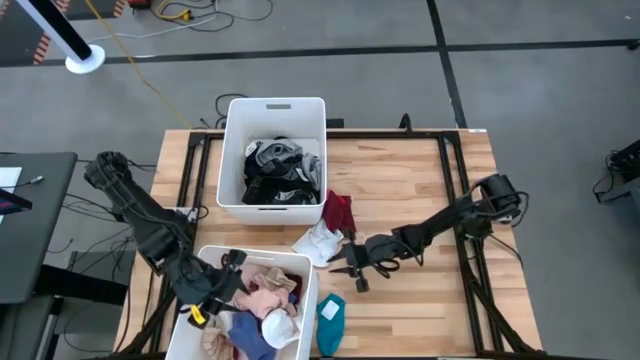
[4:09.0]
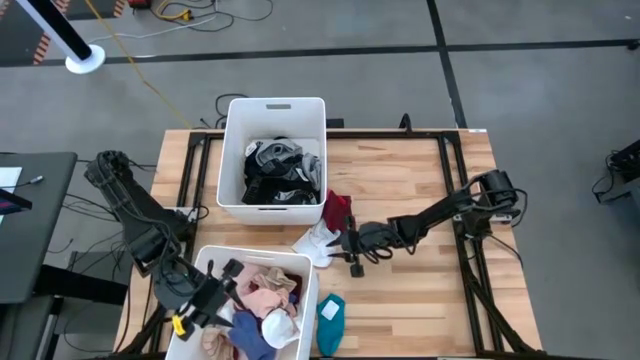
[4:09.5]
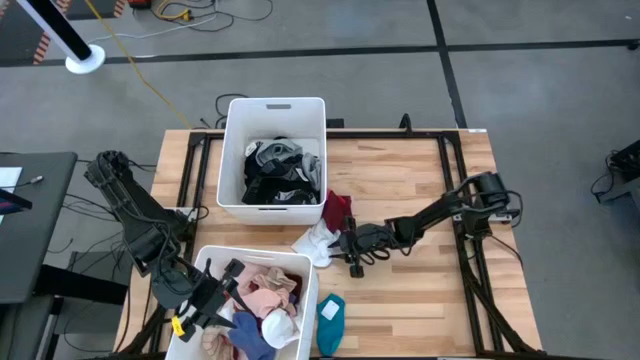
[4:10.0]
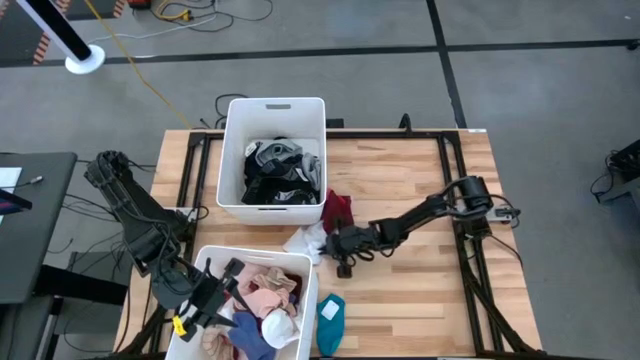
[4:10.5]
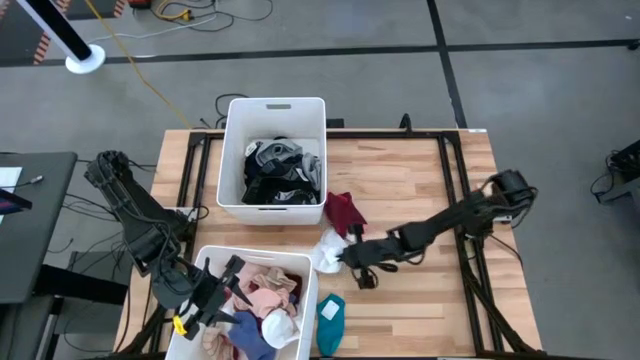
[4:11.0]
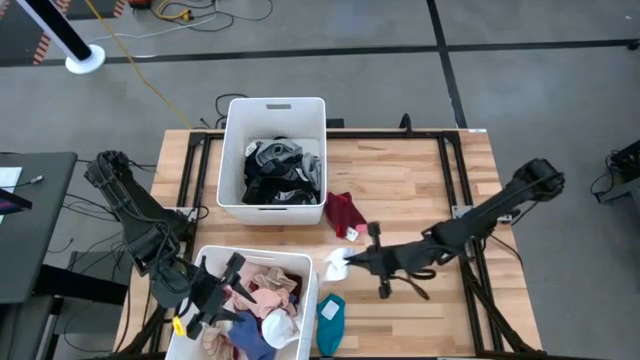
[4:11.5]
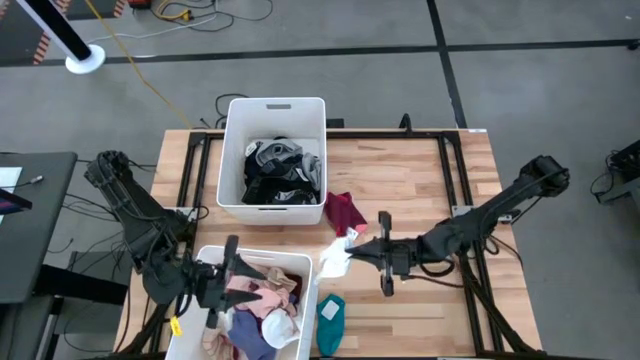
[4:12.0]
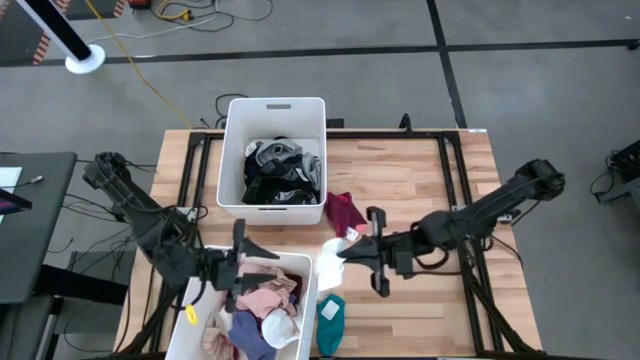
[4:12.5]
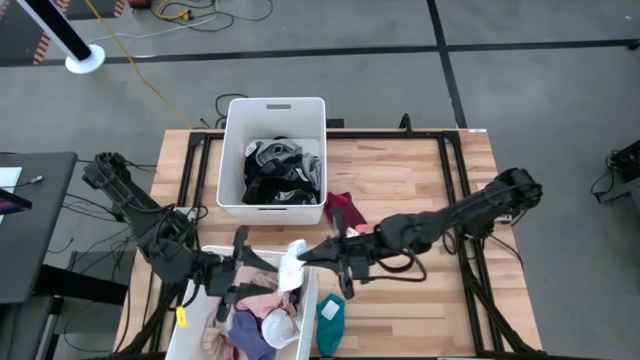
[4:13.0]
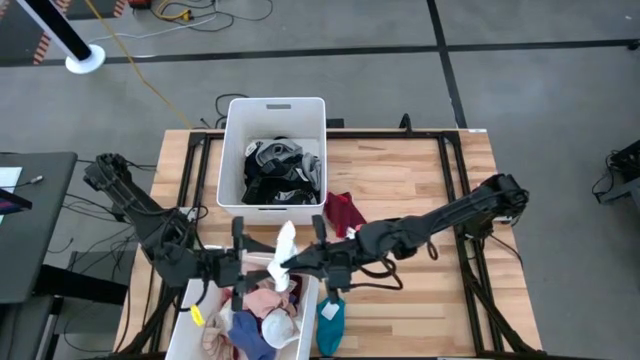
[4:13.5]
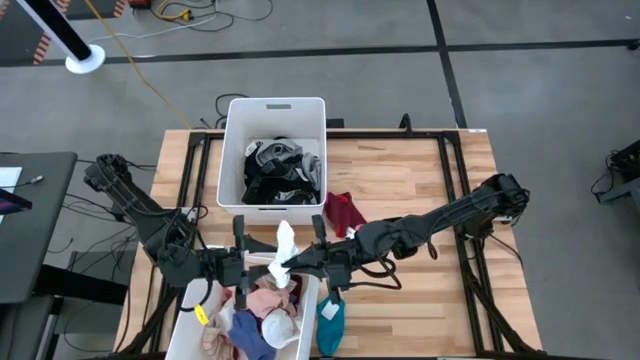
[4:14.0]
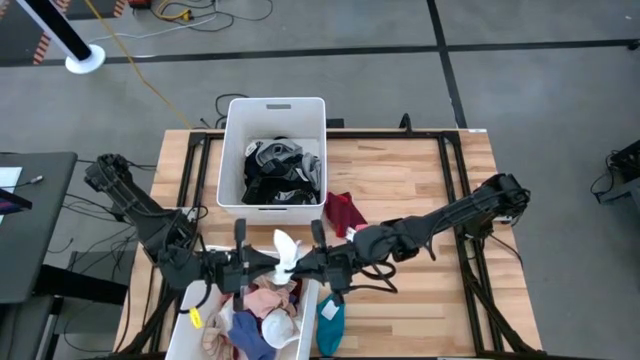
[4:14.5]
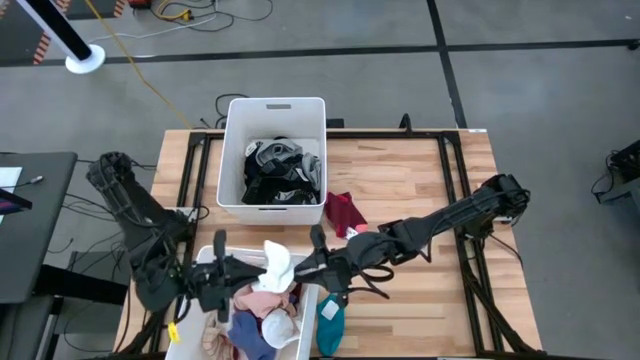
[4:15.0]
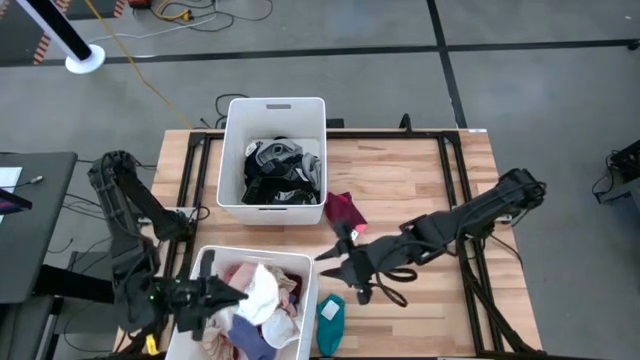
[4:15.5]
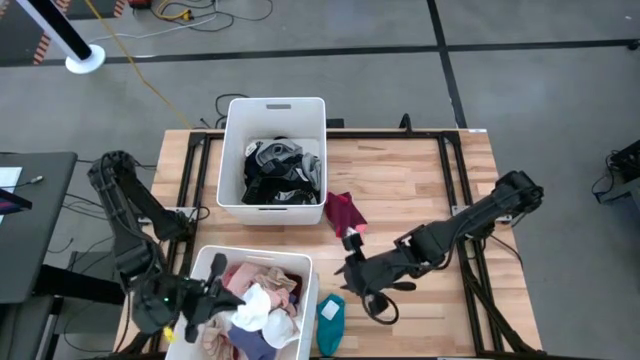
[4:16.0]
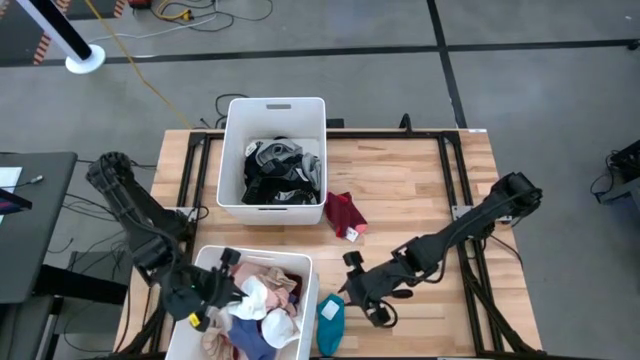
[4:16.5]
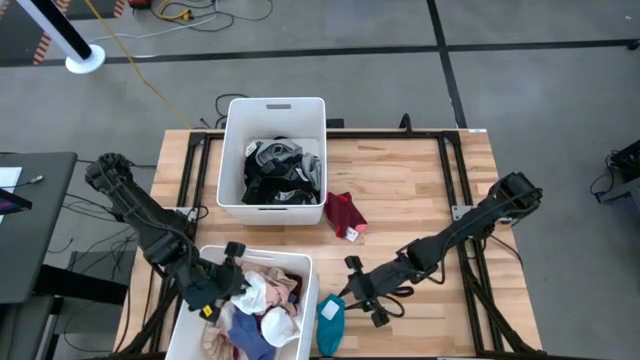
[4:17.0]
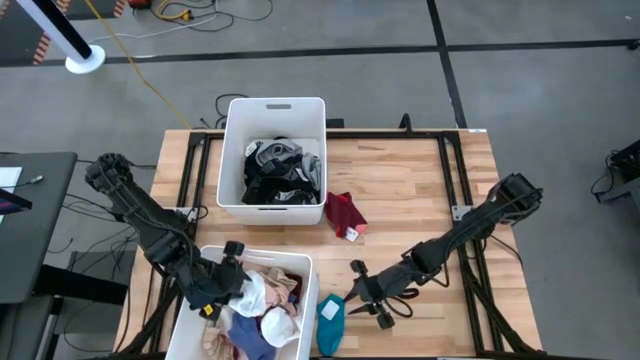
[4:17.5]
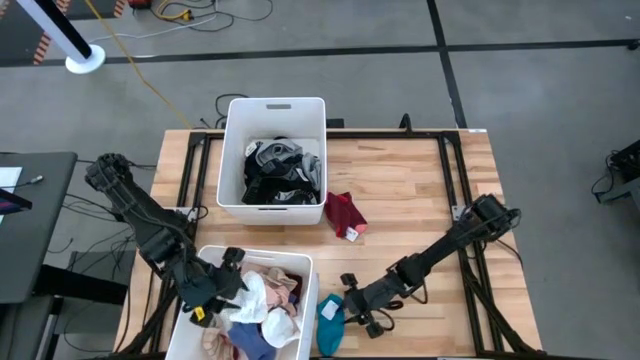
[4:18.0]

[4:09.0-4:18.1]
Task: Sort clothes
Put the white towel into the bottom white laundry bin

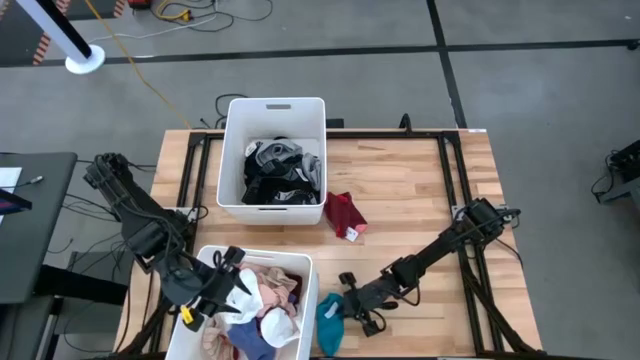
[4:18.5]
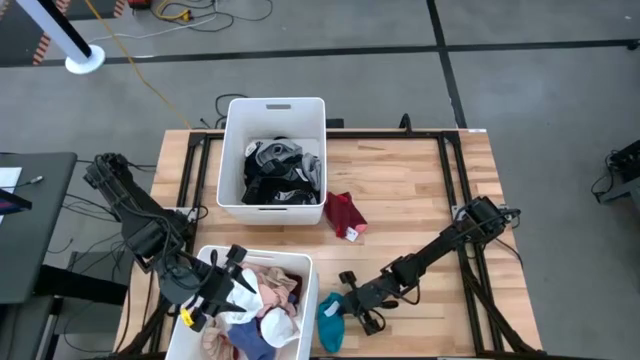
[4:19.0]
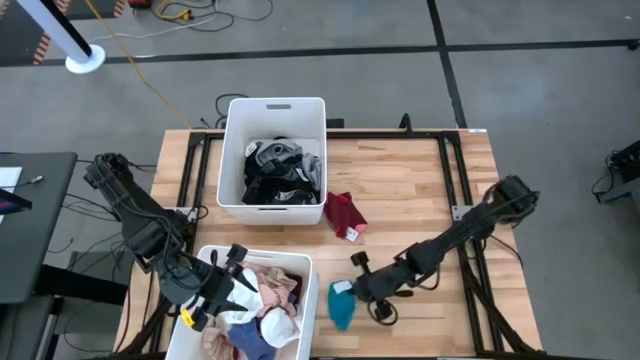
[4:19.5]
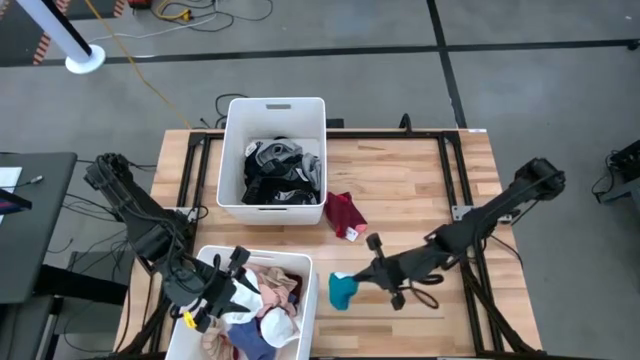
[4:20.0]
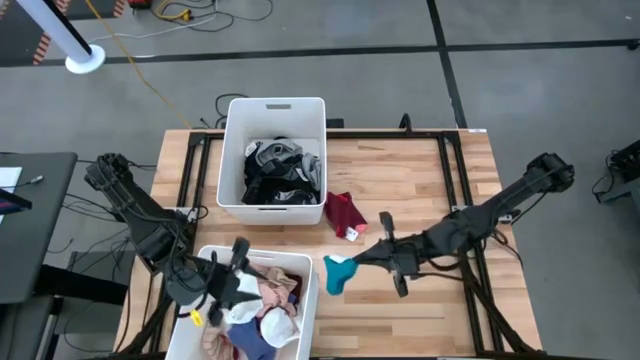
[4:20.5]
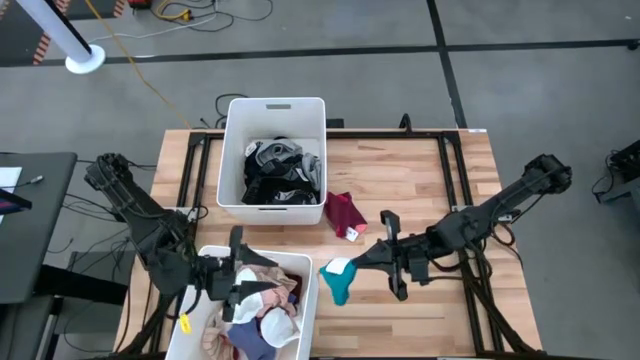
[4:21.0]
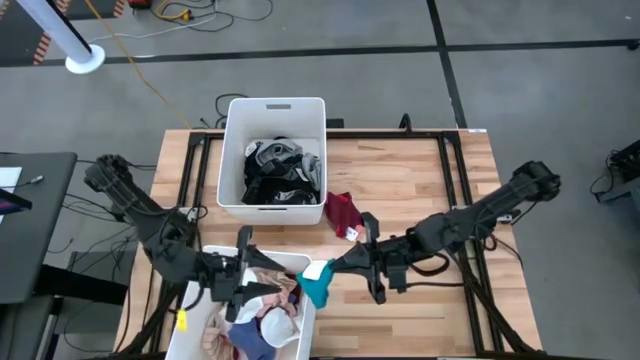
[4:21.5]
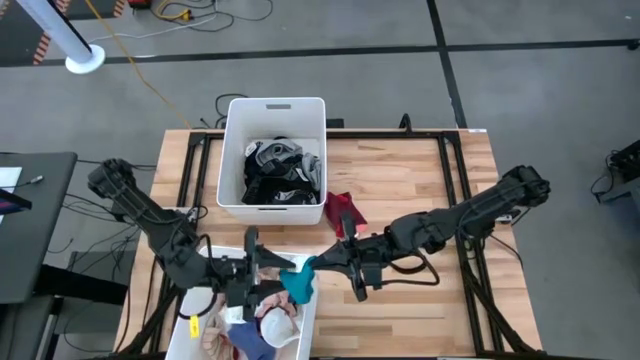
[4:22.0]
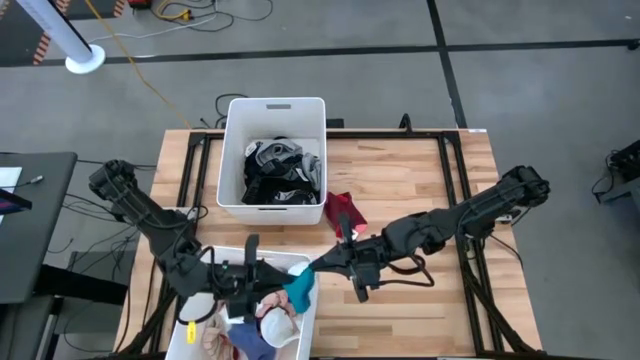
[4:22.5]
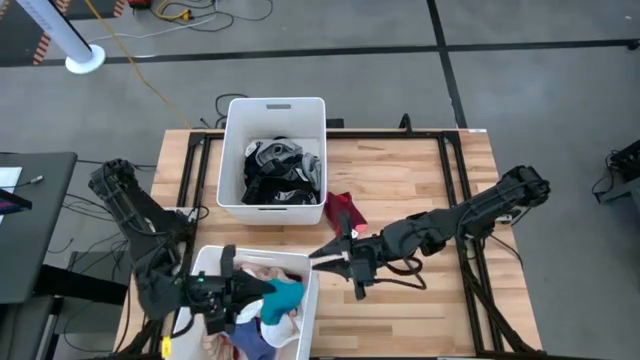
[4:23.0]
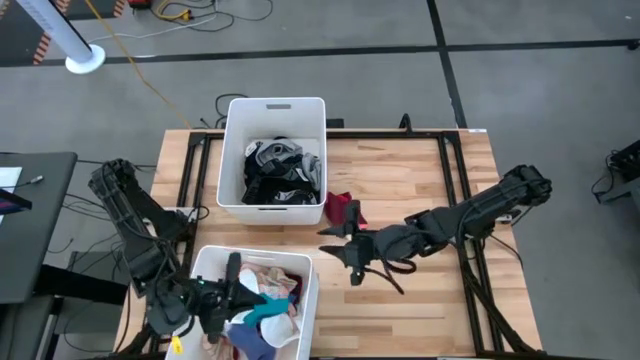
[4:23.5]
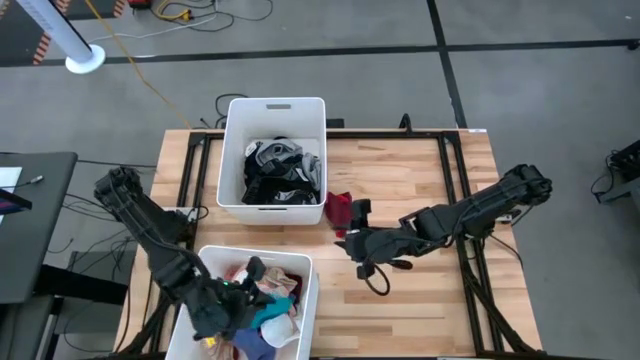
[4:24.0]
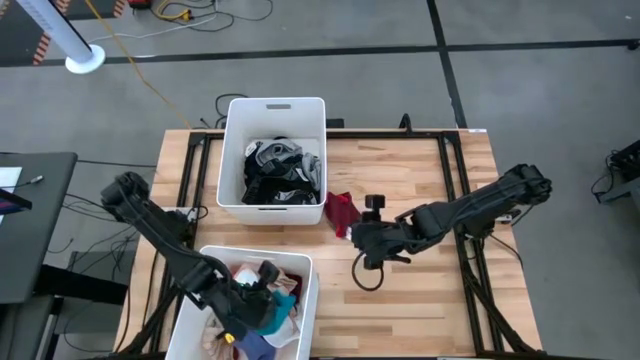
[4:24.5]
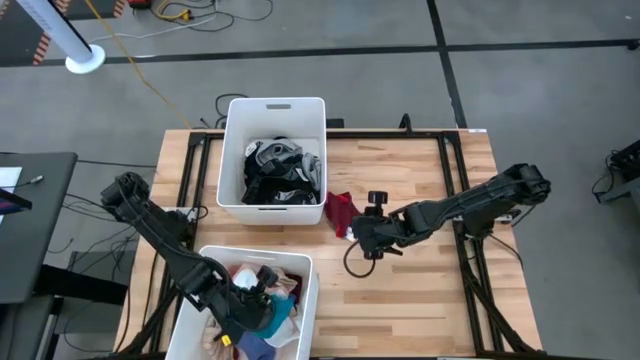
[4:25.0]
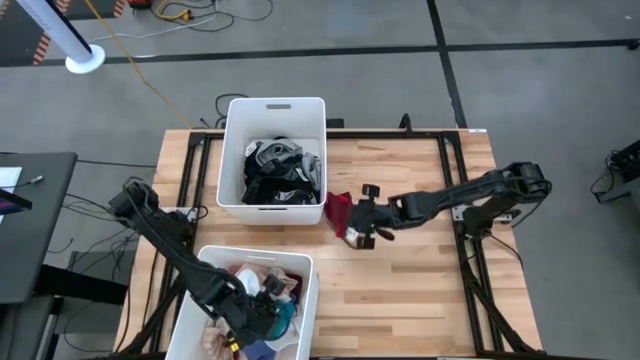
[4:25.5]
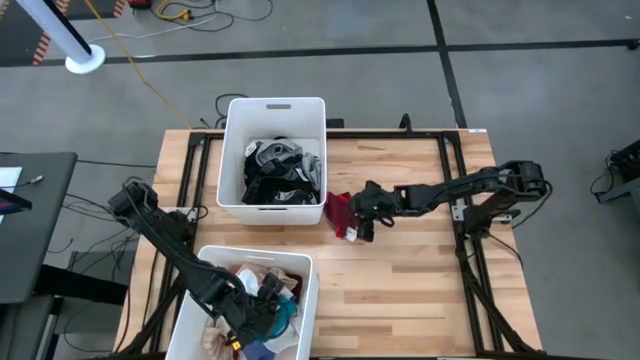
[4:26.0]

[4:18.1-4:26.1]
Put the blue sock into the bottom white laundry bin
